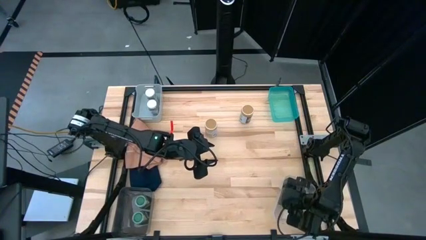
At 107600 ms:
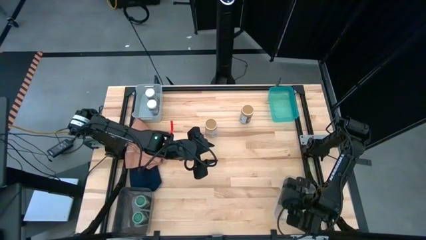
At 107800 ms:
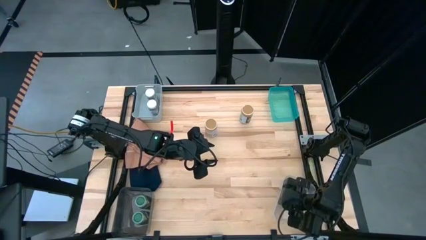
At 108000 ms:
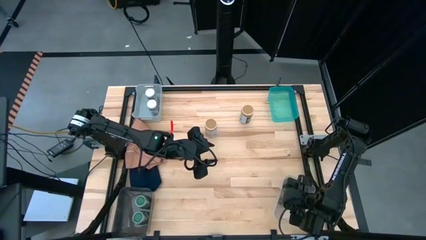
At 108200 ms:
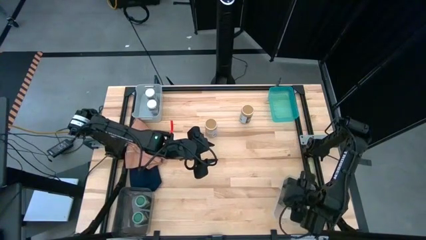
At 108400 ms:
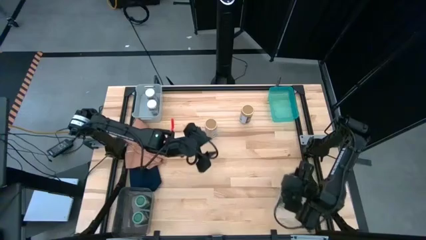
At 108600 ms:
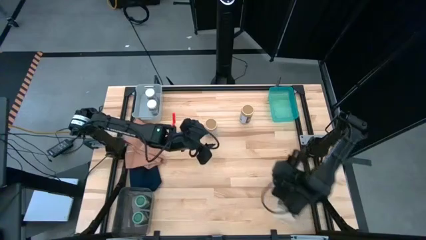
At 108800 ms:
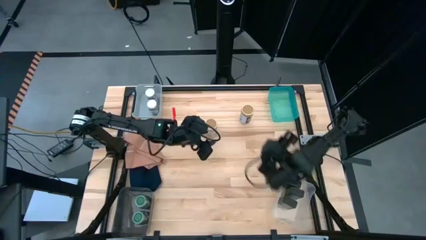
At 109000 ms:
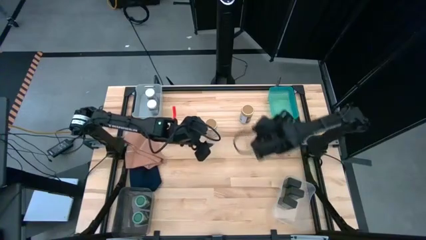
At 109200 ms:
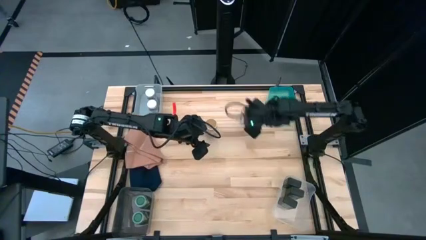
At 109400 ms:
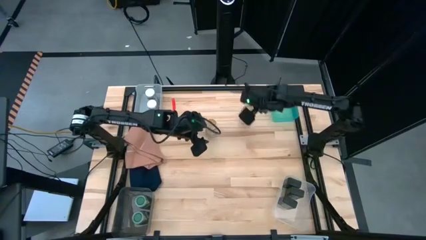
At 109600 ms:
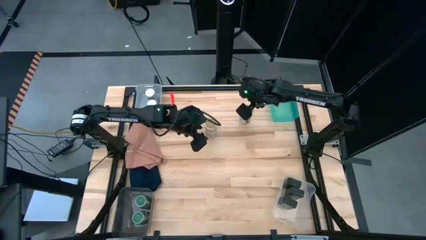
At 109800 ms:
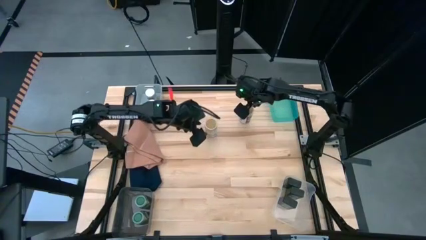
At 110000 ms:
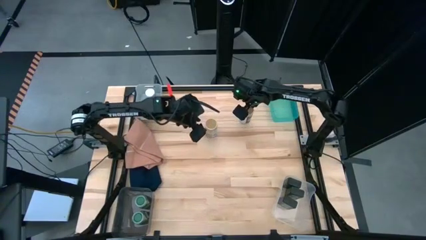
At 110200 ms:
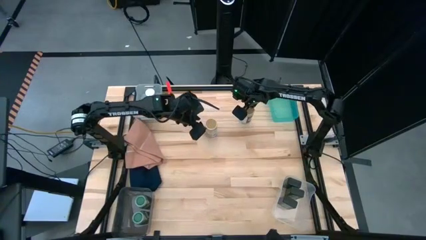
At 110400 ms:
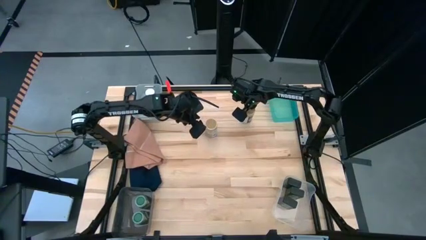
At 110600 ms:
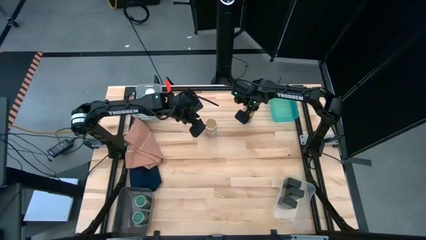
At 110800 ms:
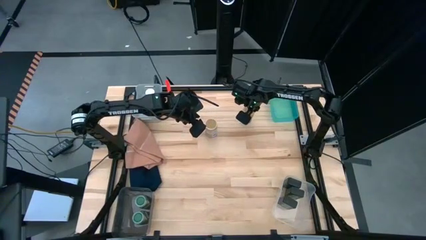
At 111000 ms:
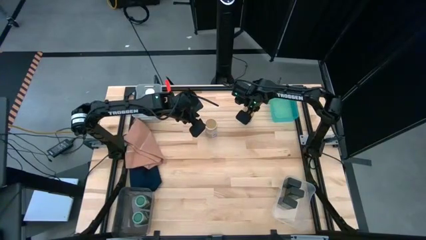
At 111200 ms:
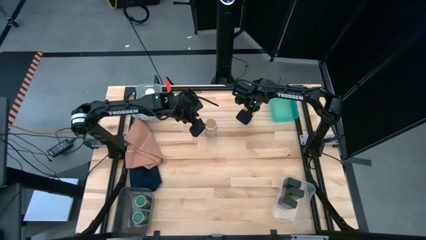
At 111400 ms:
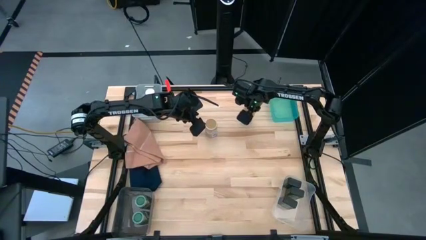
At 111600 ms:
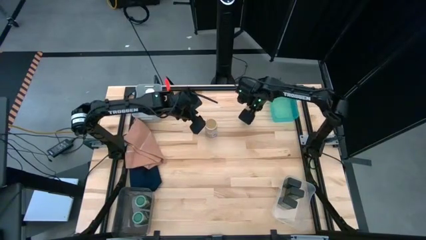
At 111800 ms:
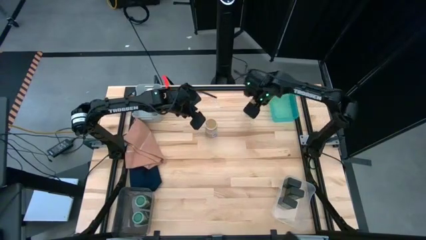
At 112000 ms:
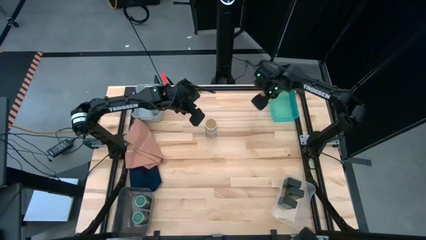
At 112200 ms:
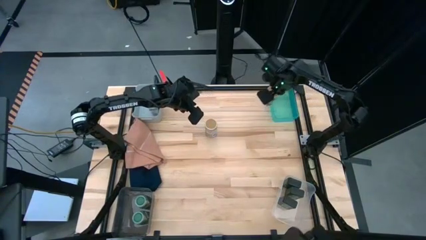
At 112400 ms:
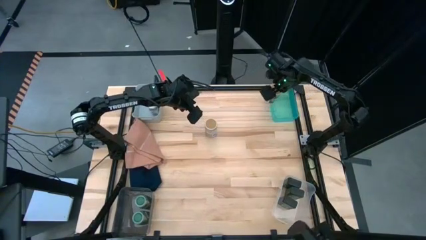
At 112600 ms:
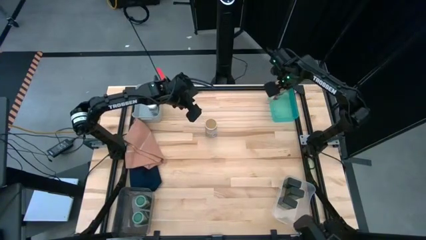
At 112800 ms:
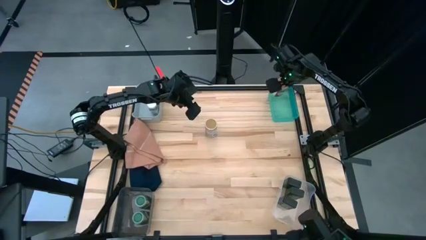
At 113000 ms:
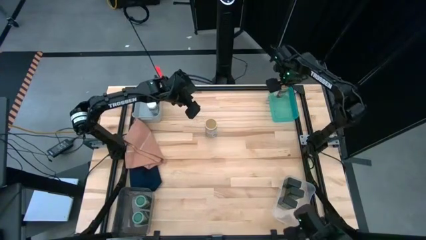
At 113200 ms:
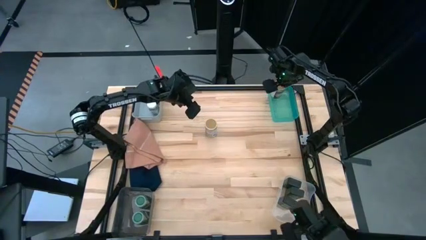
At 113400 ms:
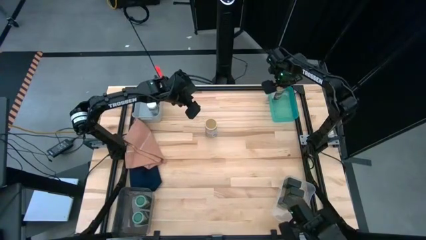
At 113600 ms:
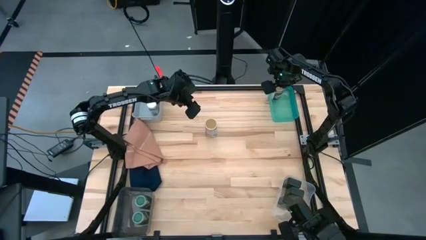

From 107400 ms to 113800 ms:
Task: Sort spices by type
Put the right golden spice bottle into the blue transparent bin

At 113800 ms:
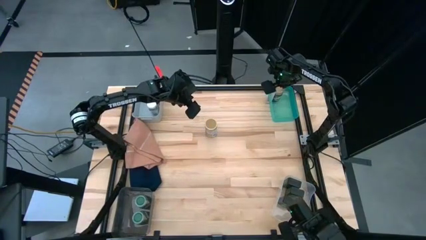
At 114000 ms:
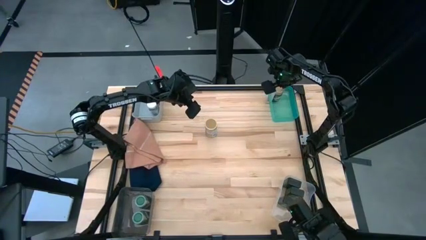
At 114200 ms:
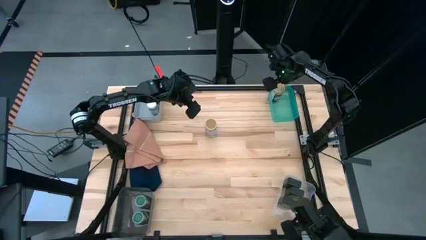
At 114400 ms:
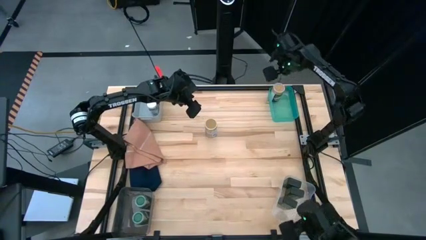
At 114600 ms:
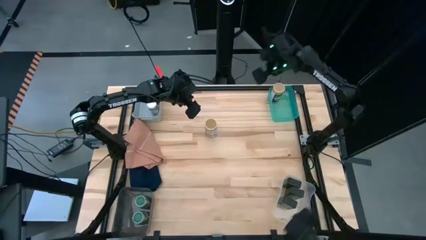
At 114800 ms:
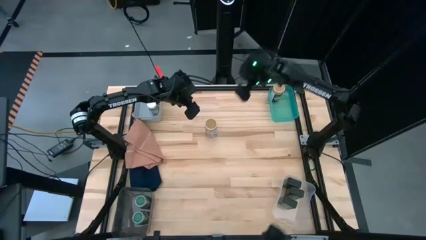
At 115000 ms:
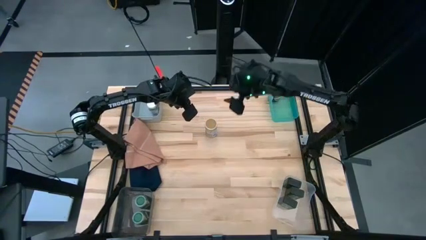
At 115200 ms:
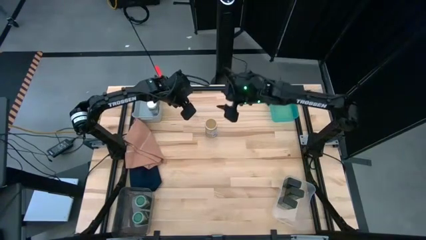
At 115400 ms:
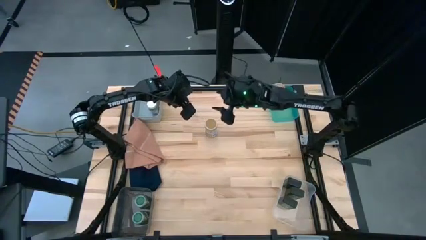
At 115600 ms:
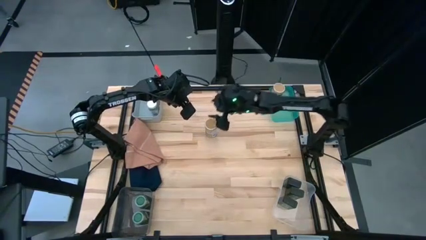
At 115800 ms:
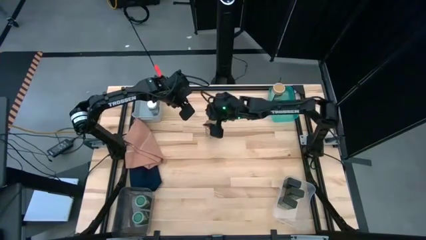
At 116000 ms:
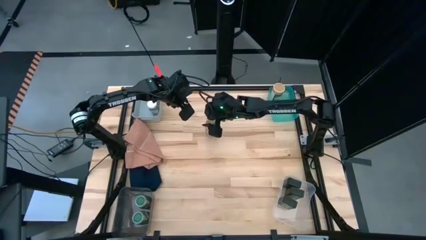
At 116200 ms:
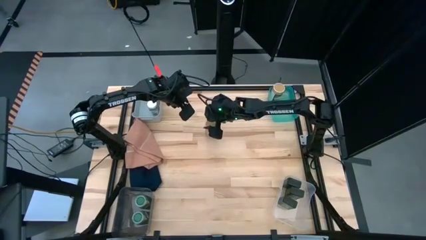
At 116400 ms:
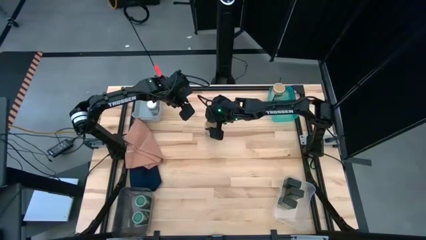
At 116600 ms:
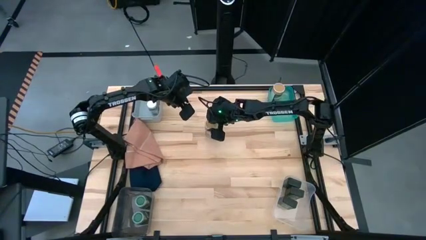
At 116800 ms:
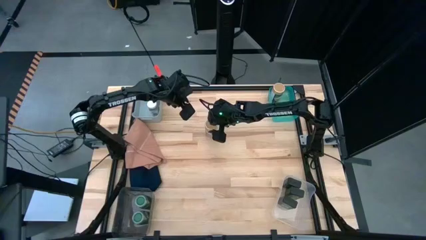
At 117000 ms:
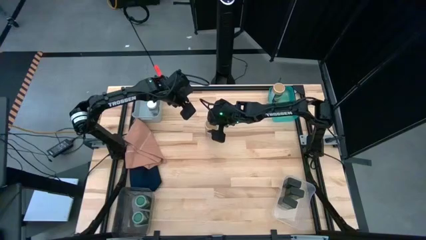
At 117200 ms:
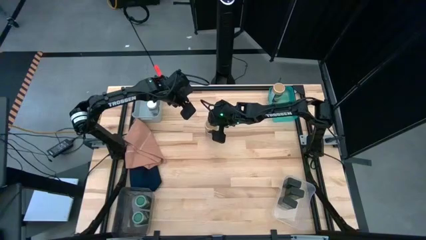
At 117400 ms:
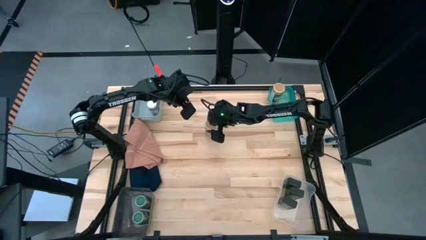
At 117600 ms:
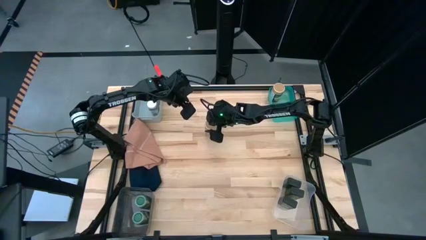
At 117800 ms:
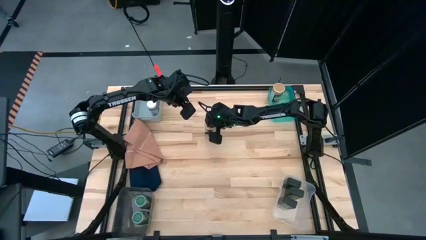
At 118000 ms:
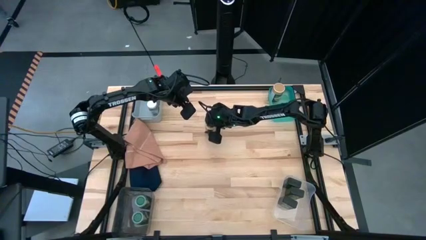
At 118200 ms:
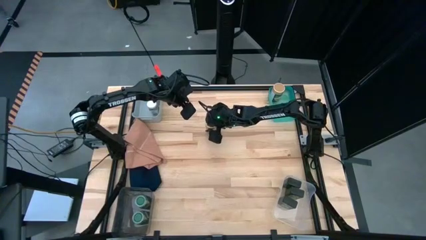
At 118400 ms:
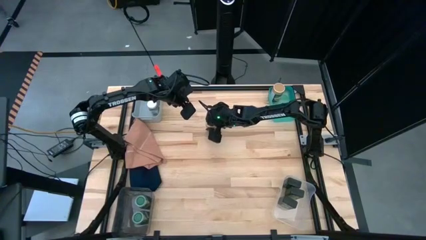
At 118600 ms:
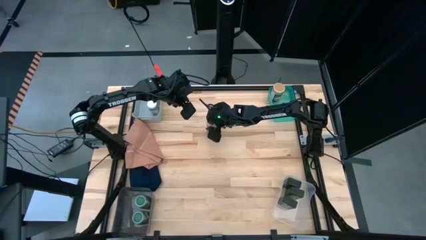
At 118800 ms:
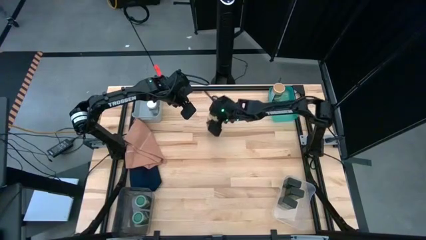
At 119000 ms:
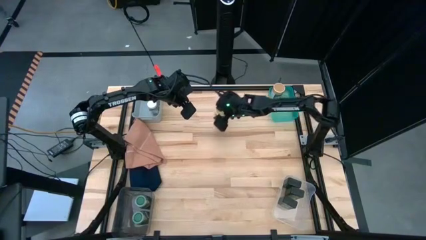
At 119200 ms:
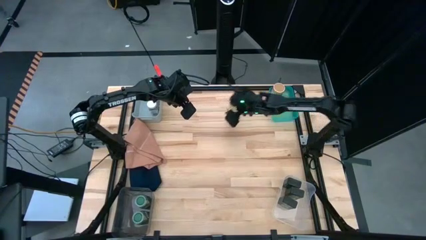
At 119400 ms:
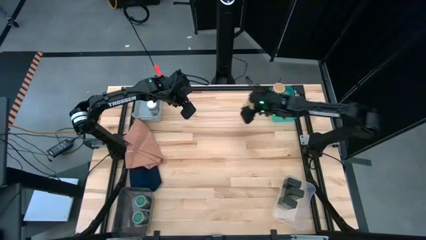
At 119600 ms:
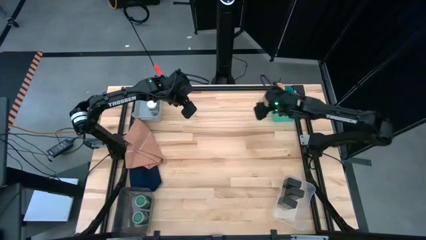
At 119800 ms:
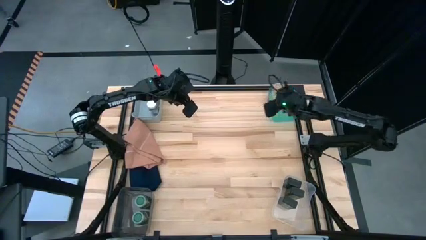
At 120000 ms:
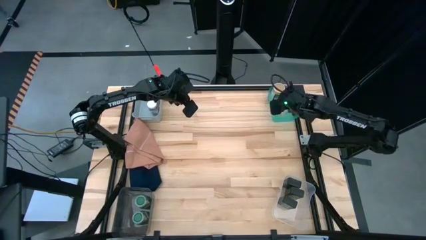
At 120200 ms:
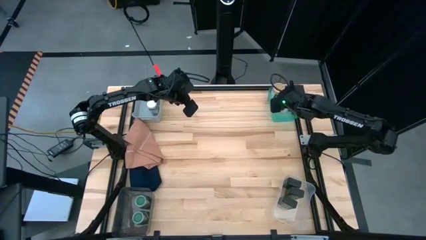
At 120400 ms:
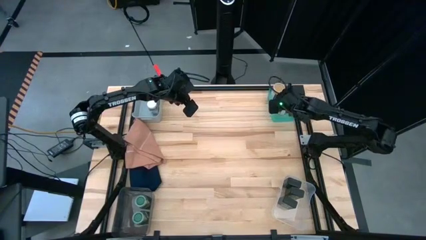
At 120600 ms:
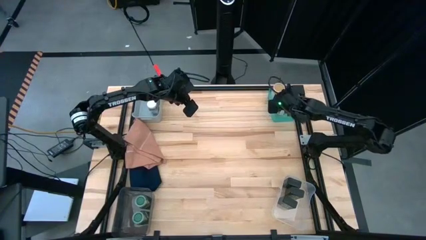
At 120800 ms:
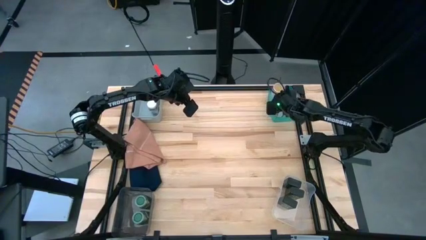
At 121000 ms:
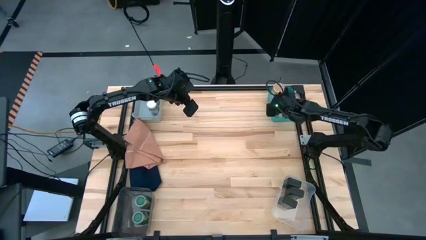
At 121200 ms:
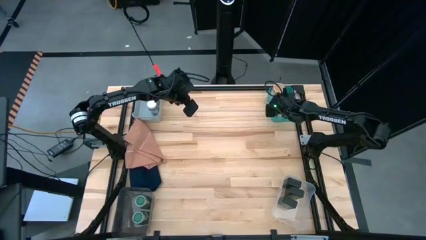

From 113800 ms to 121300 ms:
Put the golden spice bottle into the blue transparent bin

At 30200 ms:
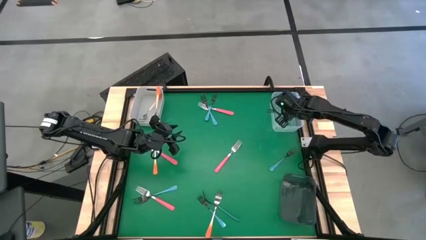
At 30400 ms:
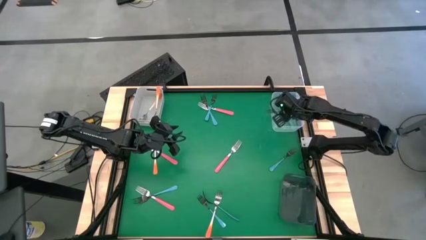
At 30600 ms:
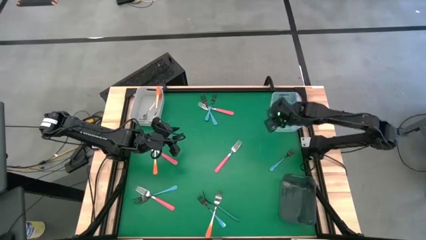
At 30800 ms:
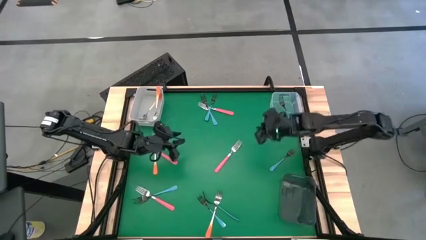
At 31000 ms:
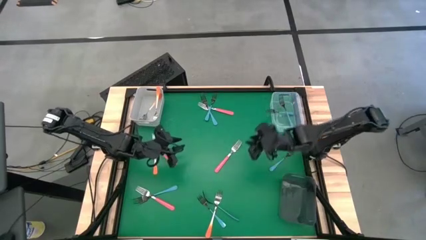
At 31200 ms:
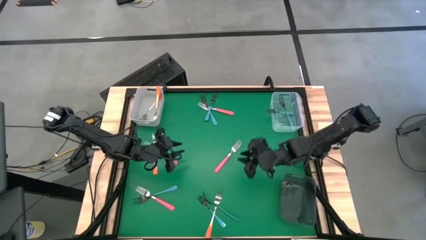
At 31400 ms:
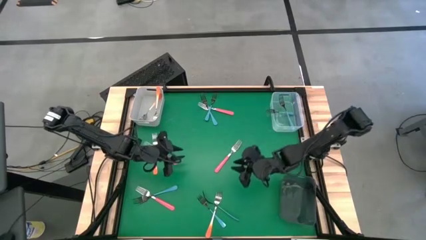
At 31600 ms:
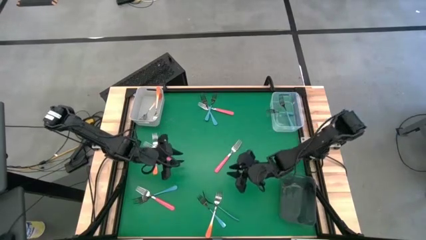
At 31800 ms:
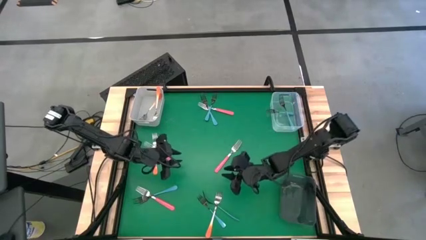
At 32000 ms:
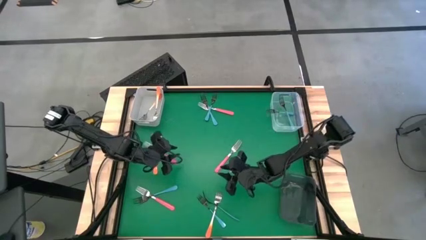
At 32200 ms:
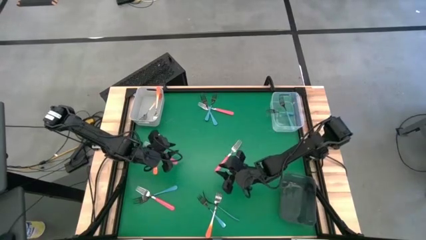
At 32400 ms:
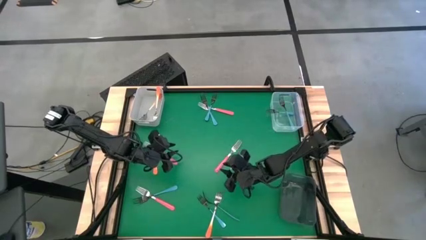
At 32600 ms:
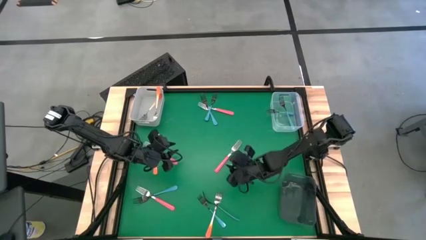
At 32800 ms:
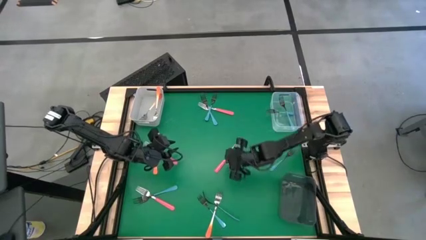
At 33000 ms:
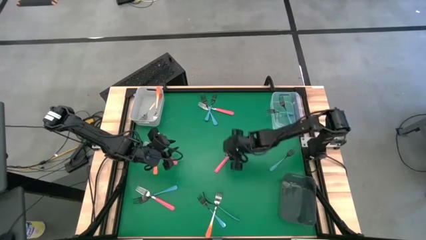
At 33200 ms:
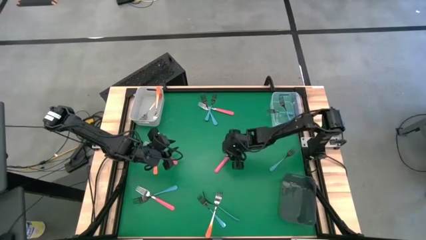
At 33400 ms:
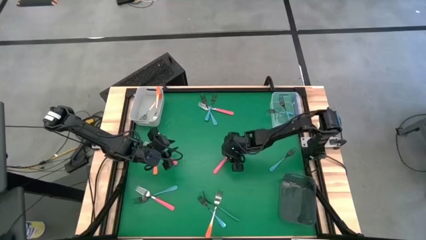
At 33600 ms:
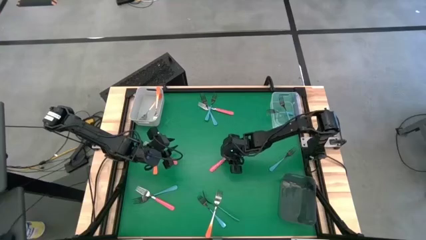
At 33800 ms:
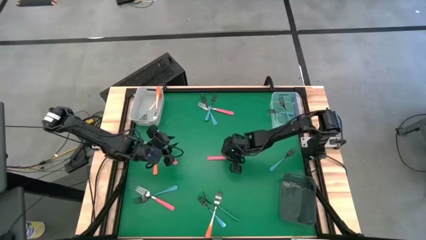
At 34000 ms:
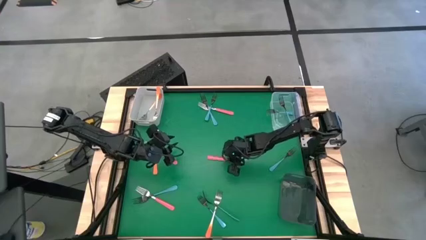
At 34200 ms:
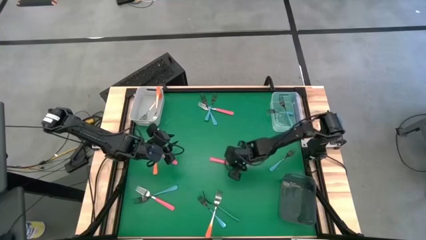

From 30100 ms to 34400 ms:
Task: Sort silverware by color (type)
Put the pink fork into the black bin
